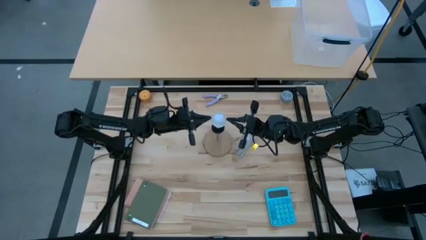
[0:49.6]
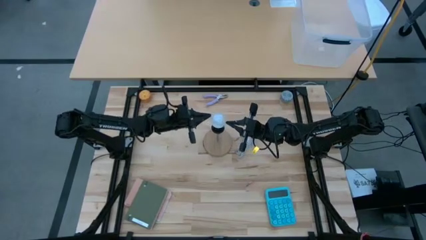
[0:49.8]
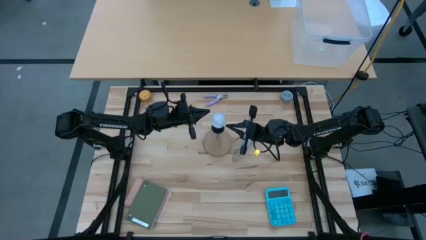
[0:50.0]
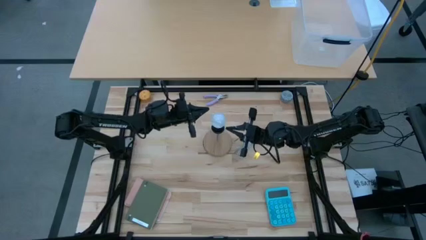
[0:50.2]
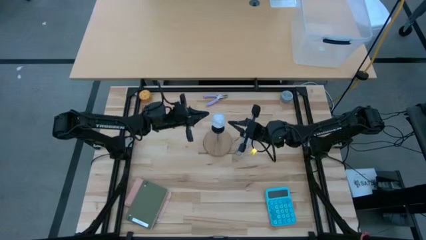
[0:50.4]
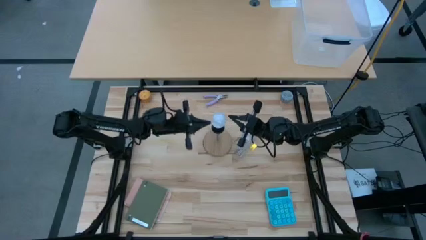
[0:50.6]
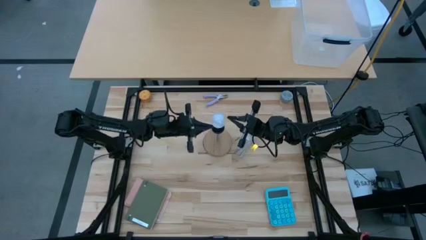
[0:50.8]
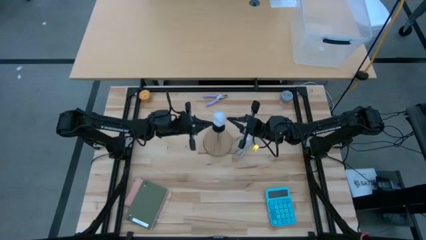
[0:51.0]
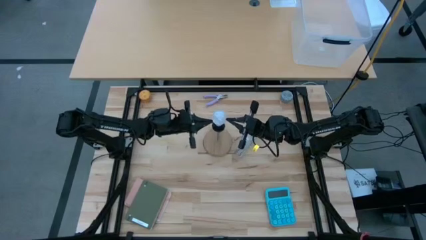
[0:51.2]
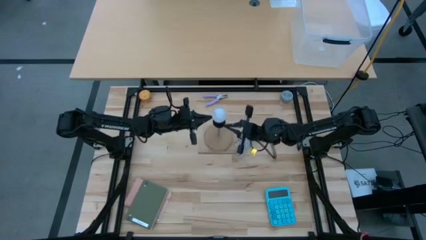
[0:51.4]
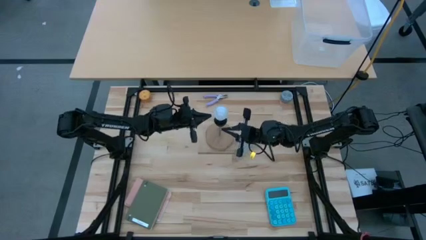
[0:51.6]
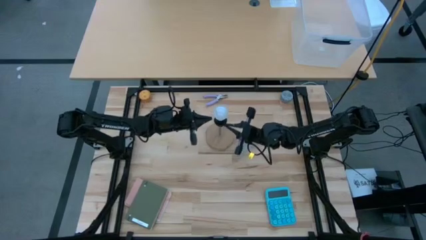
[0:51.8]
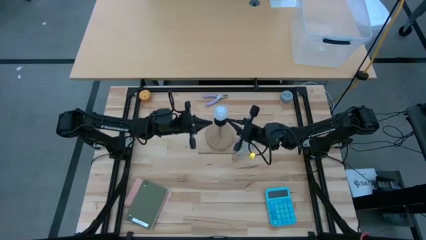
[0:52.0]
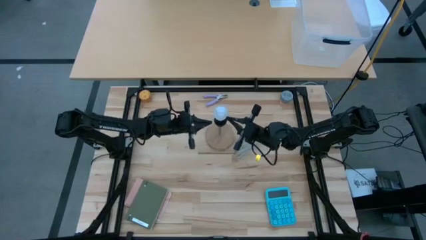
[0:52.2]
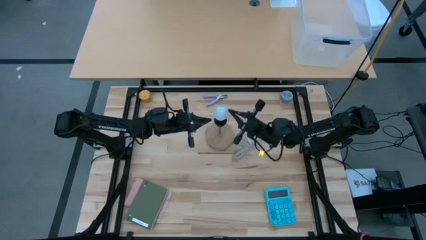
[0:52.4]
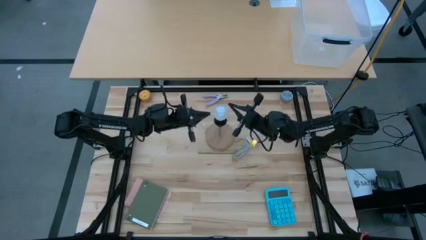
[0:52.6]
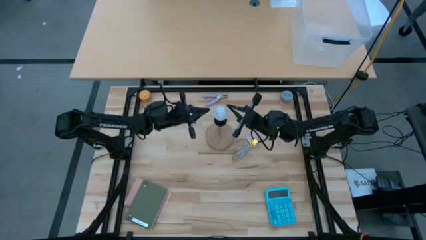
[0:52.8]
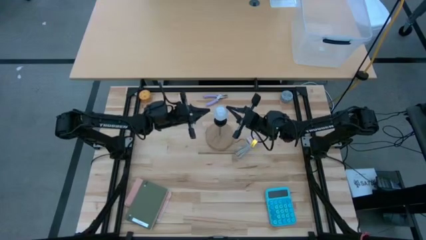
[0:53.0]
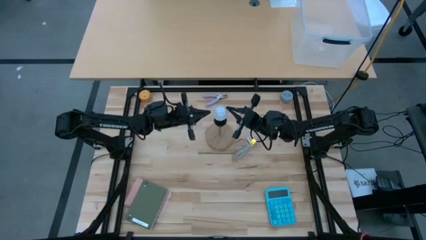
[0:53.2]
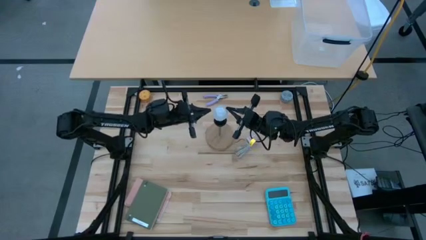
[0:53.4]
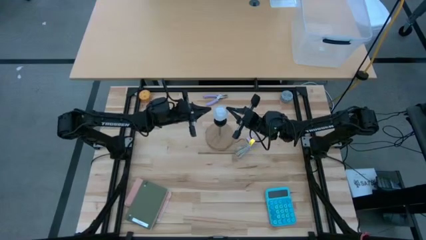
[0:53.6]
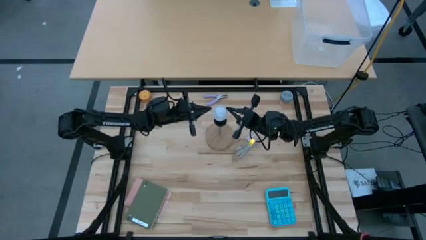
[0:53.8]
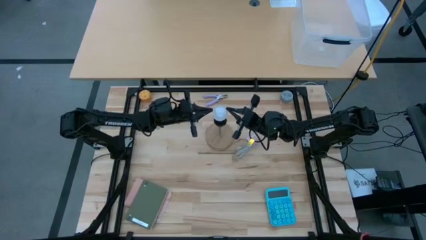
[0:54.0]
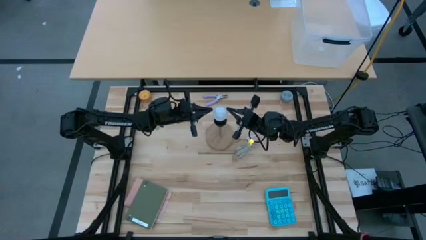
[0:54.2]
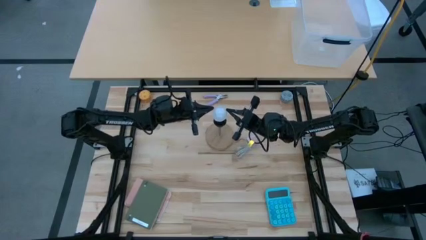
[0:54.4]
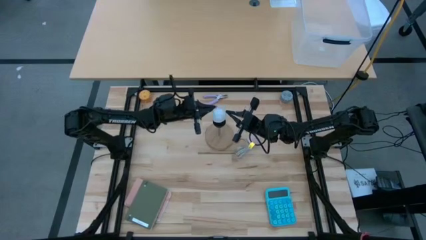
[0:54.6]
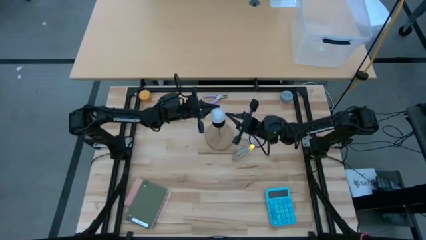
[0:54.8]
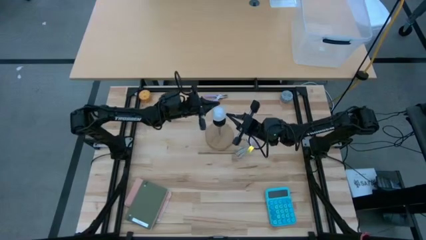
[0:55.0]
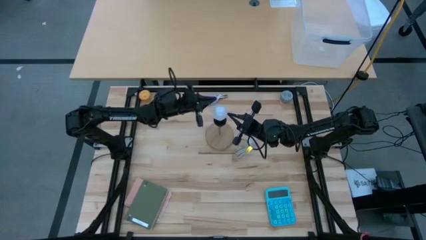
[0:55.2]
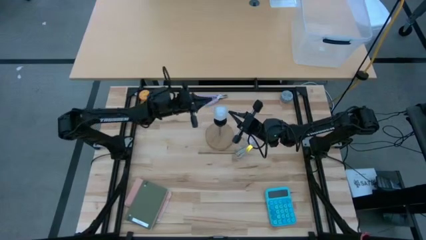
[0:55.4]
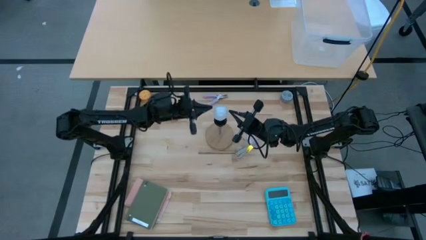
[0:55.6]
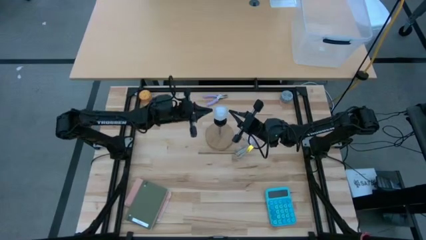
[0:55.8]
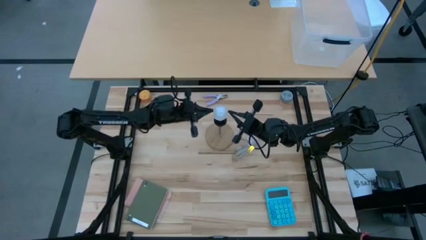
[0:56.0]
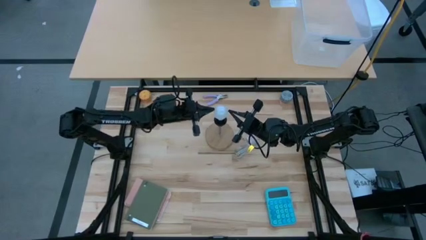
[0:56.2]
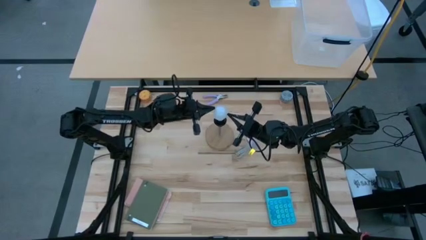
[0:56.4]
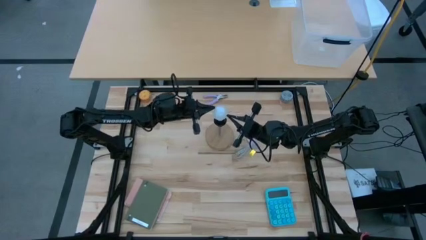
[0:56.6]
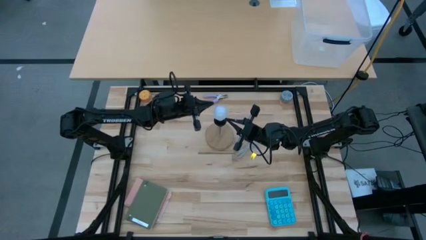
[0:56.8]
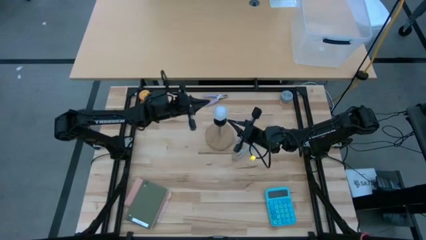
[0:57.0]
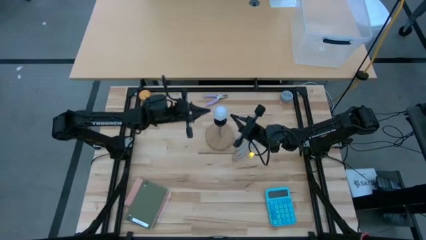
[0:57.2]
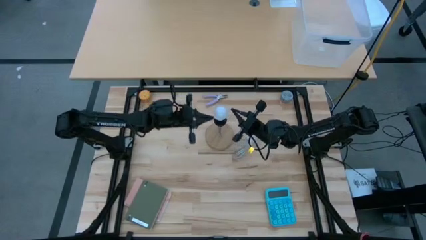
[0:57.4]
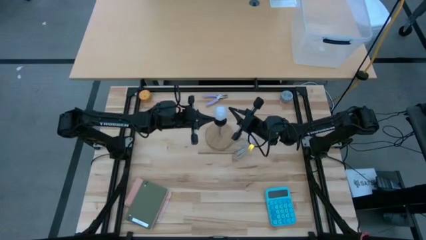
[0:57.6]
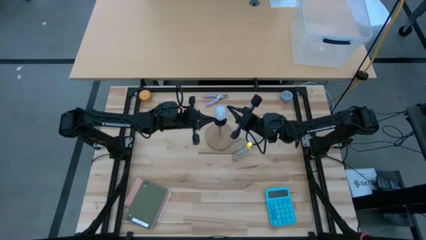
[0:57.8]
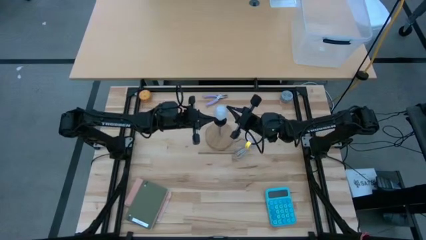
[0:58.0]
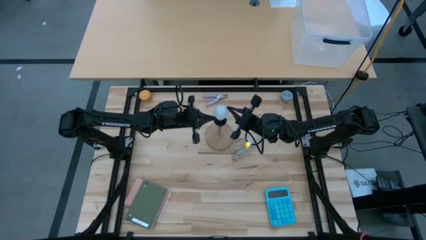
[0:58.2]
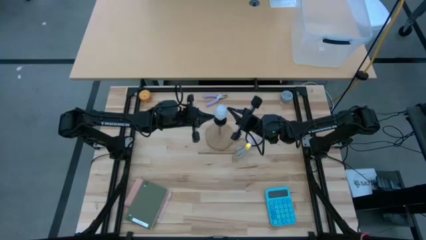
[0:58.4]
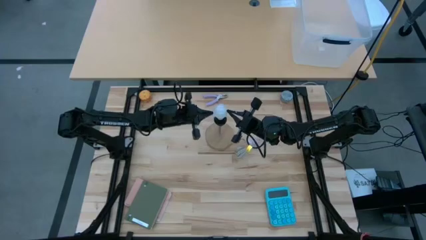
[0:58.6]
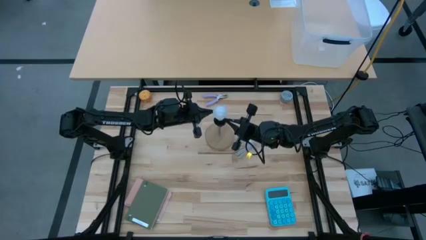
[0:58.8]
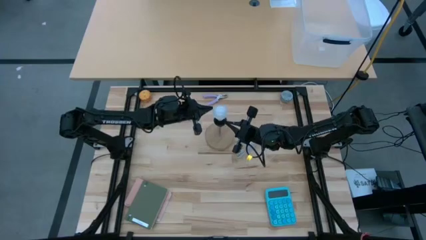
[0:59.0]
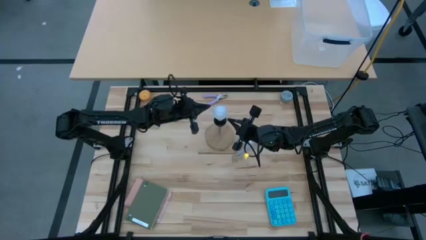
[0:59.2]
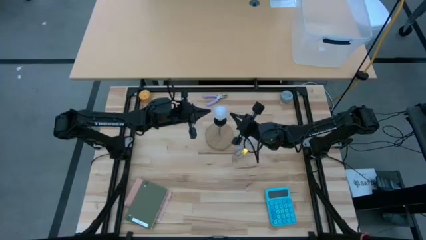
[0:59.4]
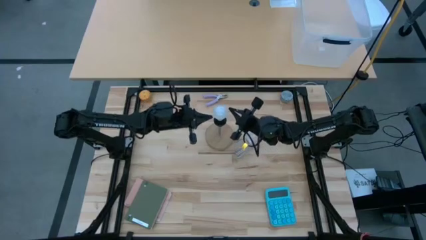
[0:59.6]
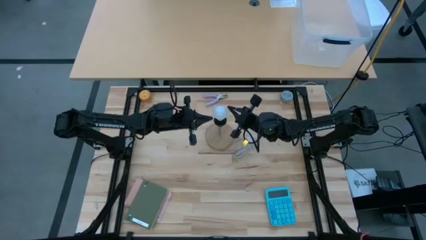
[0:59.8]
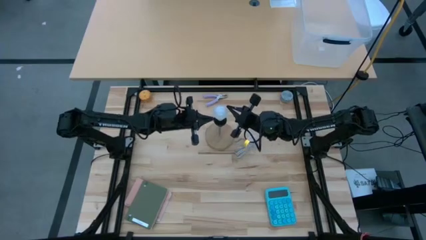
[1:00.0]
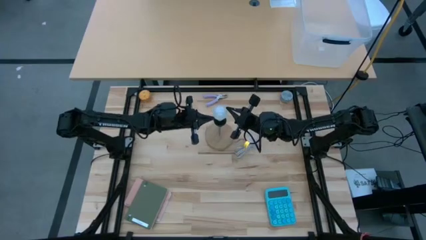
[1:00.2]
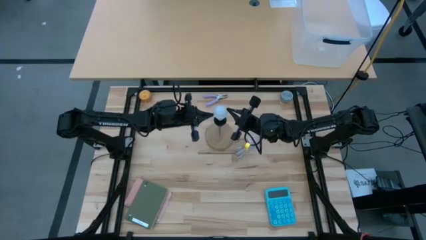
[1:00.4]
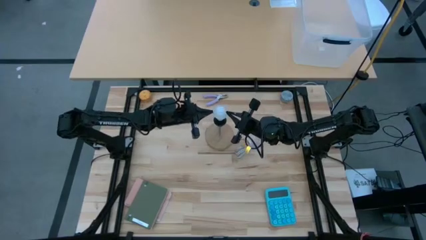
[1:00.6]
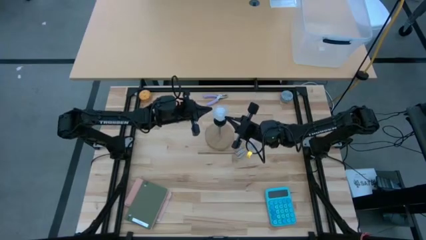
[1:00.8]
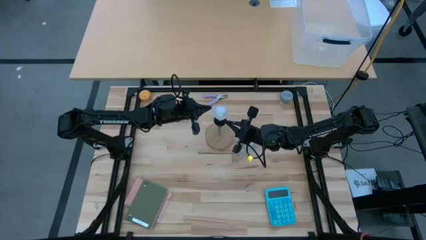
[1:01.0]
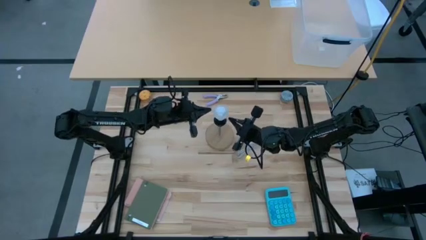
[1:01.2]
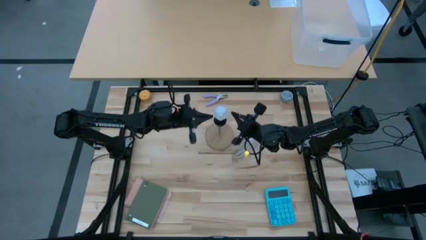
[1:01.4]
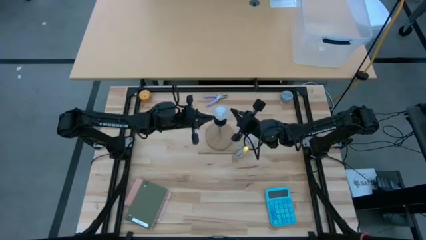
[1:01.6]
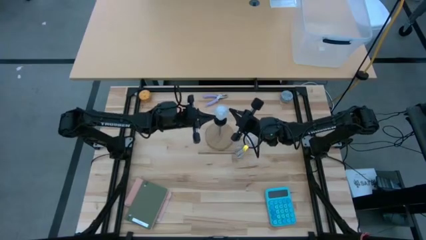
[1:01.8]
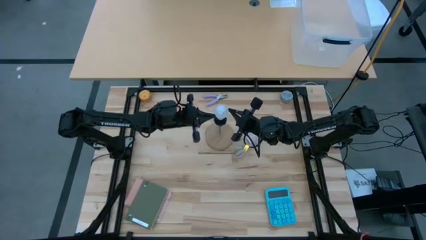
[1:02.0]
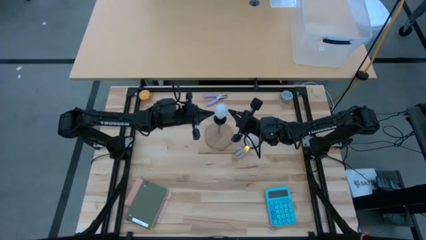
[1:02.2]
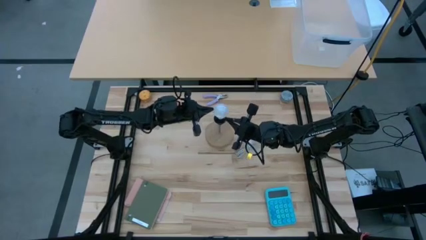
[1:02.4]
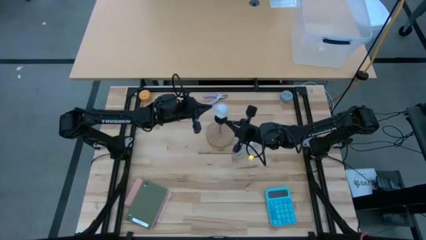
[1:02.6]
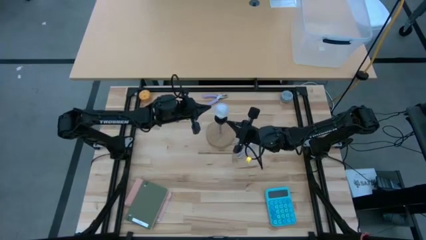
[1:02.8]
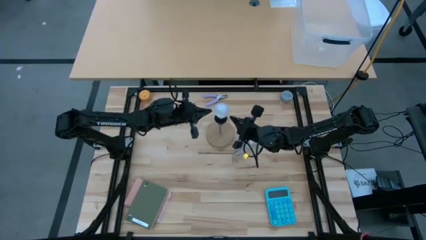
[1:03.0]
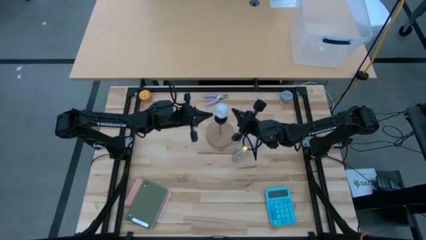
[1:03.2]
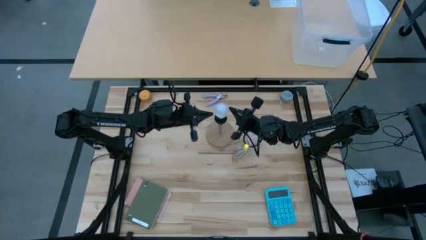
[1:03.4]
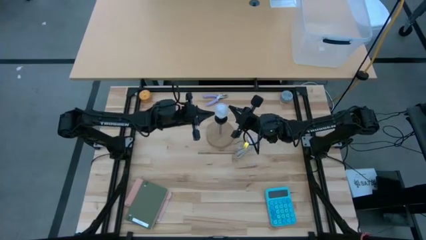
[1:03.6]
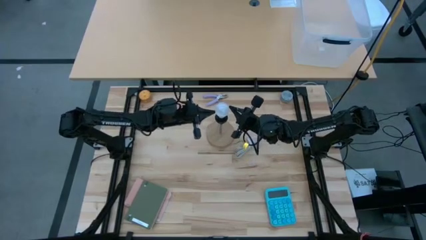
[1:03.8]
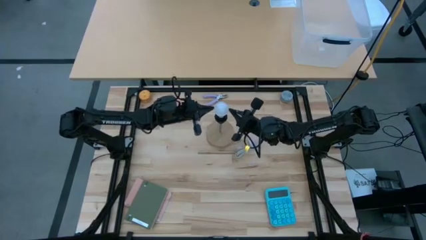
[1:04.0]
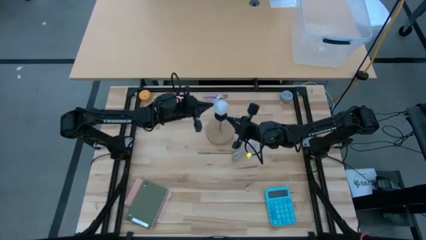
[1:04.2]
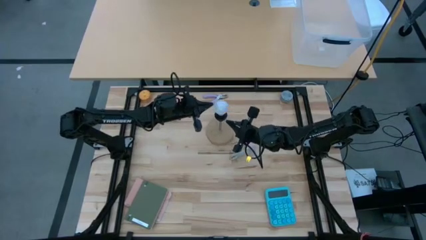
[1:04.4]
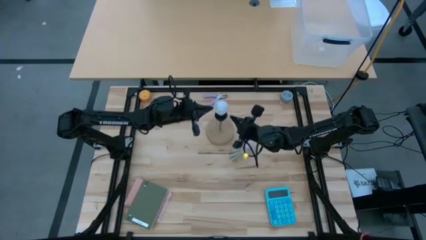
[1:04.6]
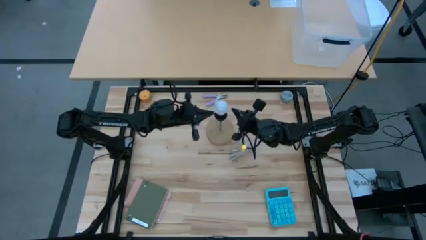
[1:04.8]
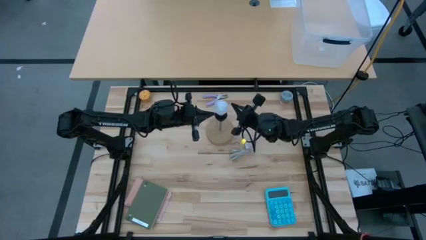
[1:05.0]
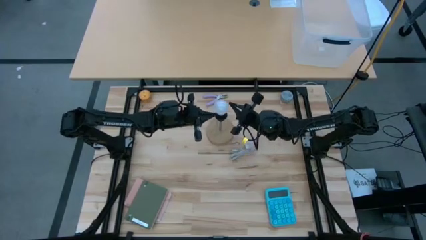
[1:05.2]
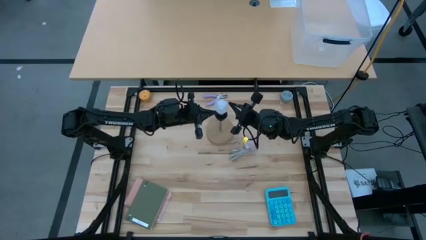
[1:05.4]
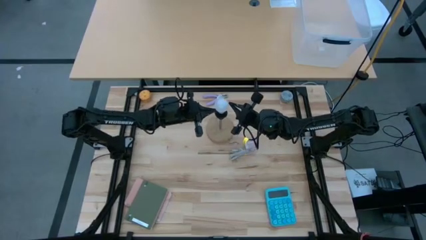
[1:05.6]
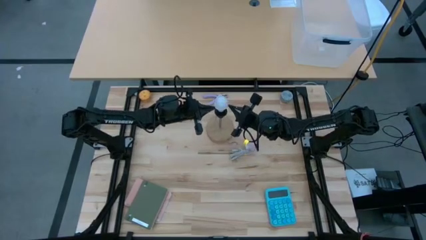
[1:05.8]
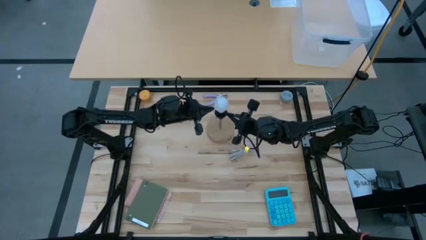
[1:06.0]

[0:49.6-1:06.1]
Task: Screw lightbulb
Insert the light bulb on the brown lamp
